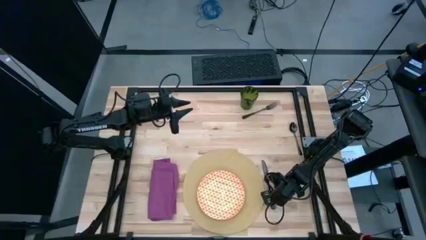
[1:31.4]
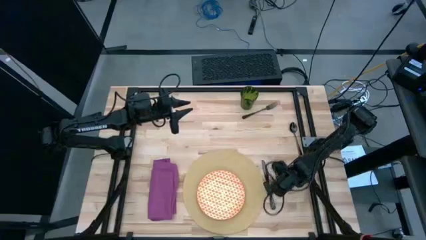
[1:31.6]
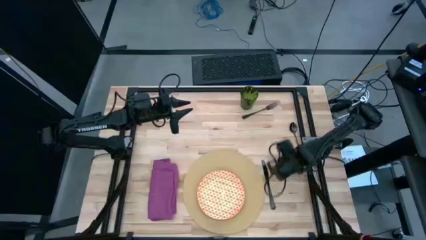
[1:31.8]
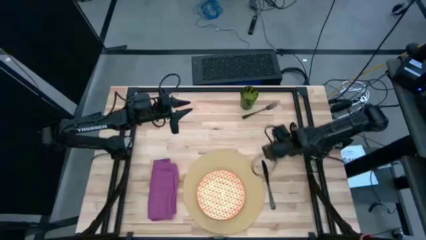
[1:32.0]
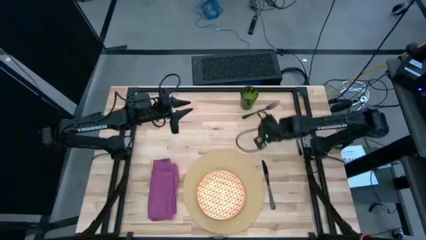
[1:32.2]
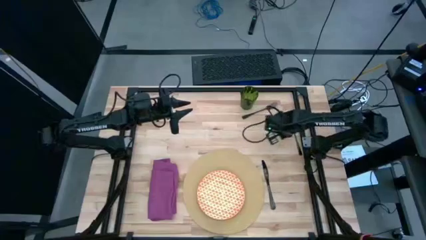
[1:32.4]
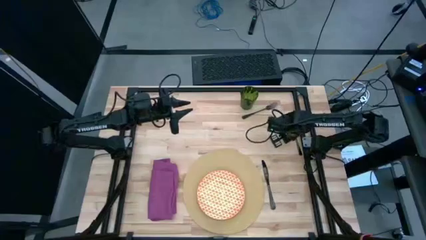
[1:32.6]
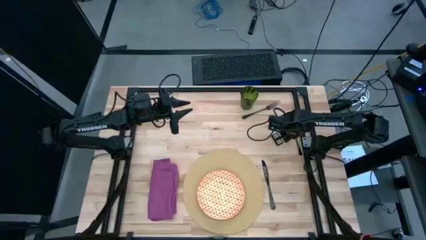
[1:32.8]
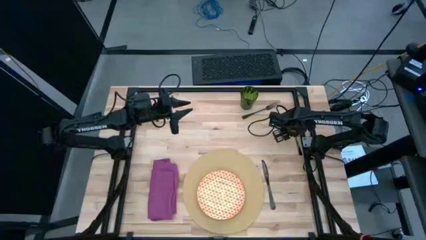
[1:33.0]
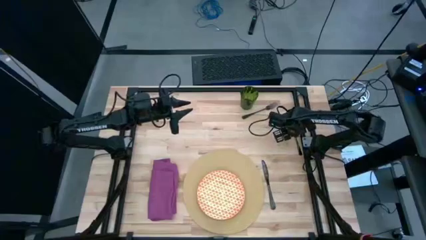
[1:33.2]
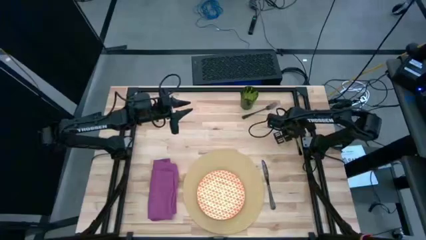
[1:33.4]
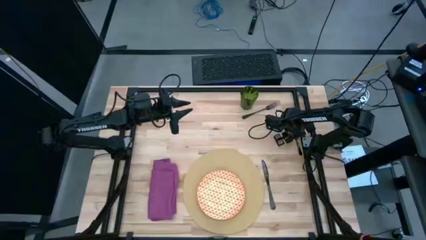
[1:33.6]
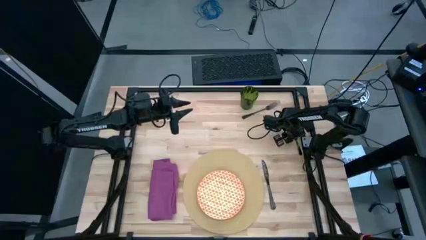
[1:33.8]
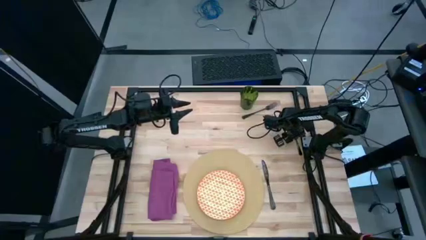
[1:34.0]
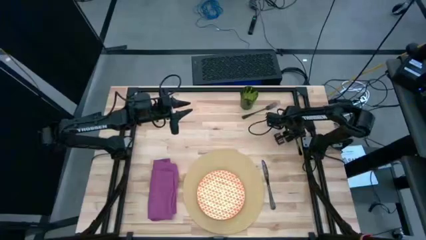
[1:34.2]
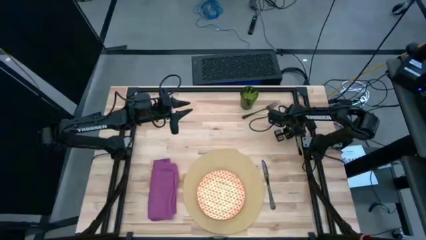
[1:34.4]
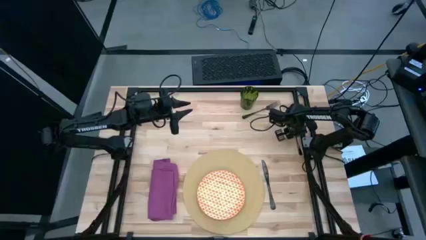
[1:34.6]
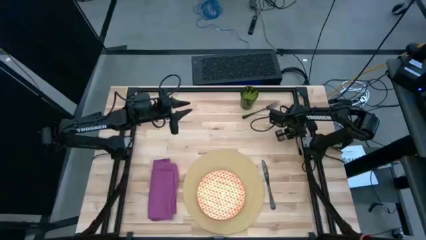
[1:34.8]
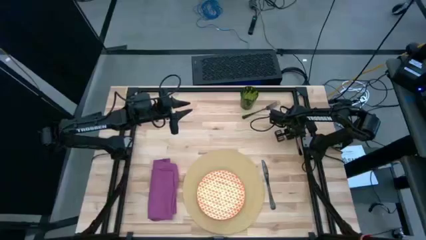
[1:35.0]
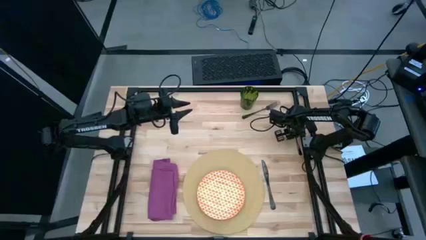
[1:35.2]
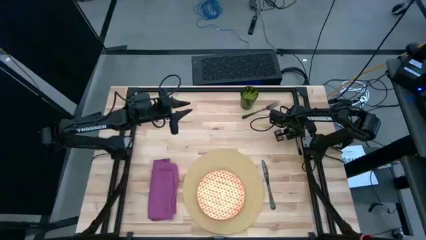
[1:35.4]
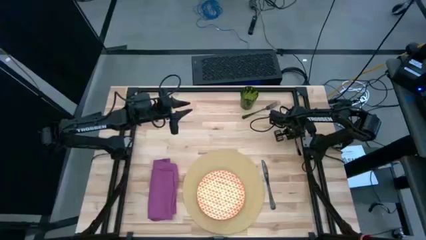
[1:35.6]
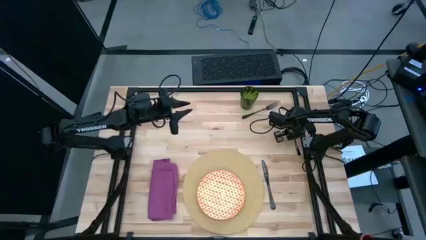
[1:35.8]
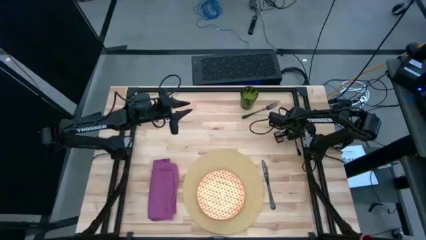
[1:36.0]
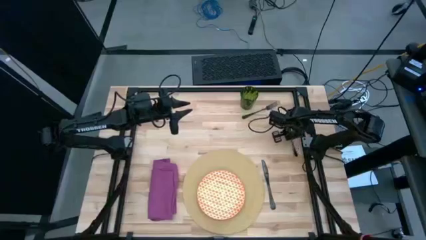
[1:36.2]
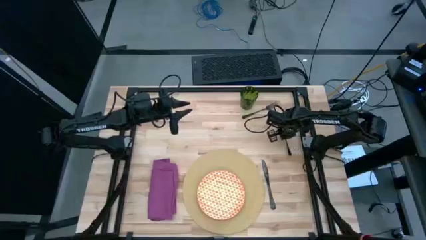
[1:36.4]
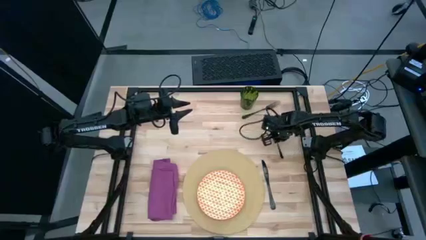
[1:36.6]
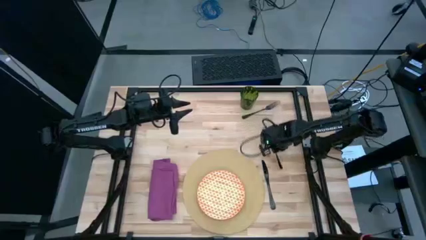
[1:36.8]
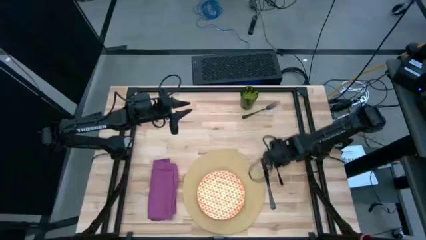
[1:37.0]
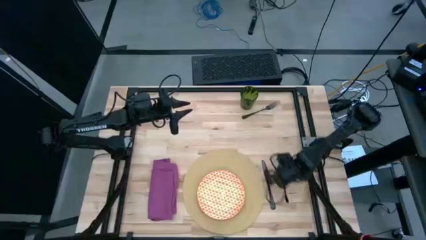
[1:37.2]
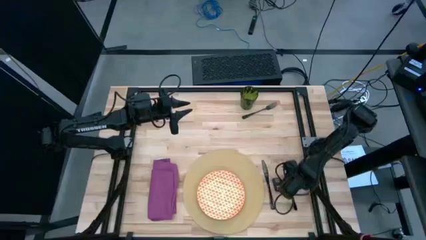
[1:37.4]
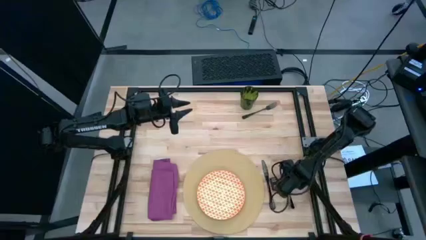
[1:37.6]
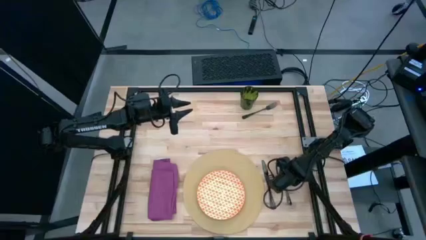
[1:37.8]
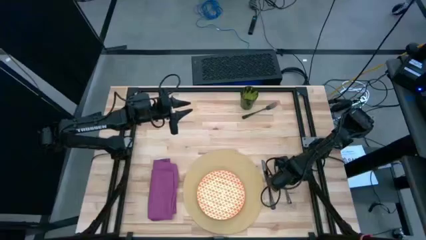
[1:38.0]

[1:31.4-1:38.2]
Task: Set table place
Move the black spoon to the right of the table knife

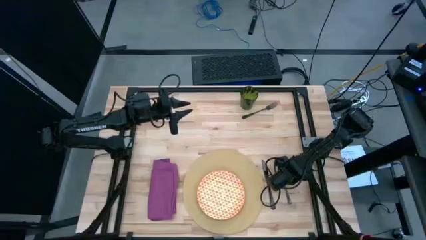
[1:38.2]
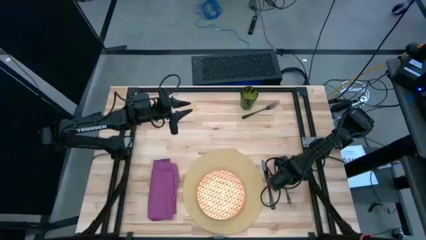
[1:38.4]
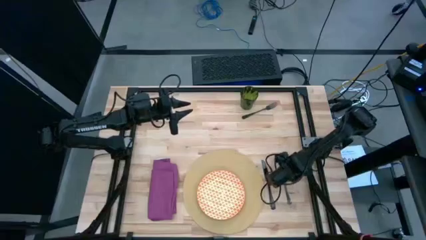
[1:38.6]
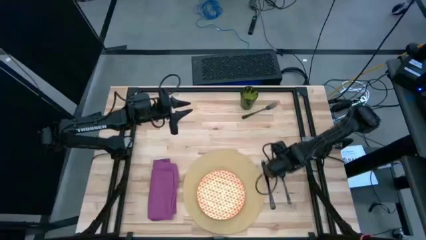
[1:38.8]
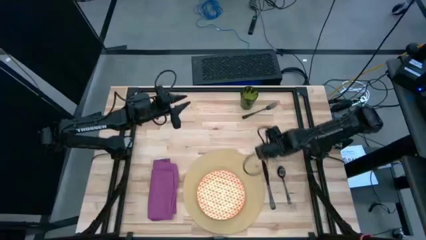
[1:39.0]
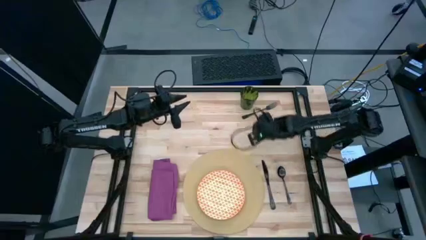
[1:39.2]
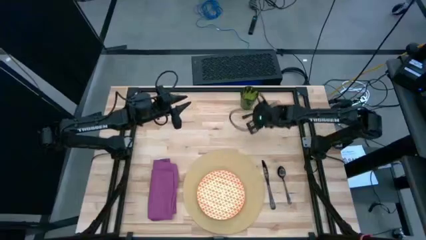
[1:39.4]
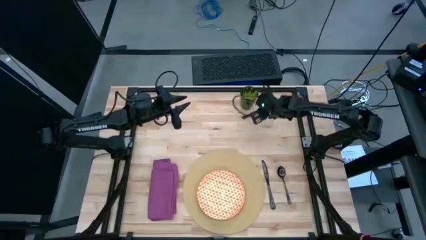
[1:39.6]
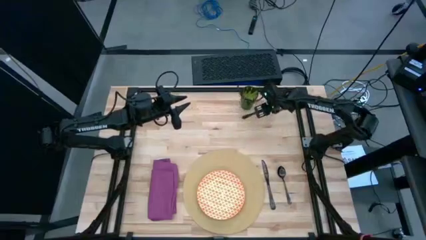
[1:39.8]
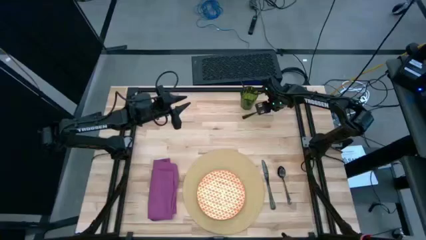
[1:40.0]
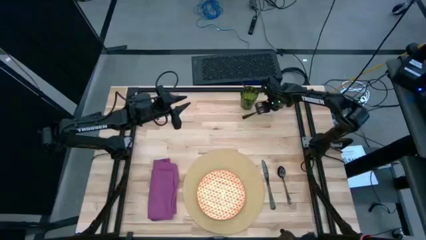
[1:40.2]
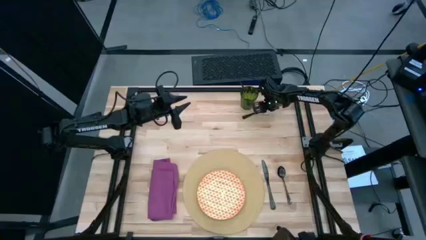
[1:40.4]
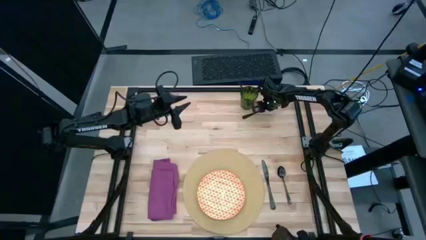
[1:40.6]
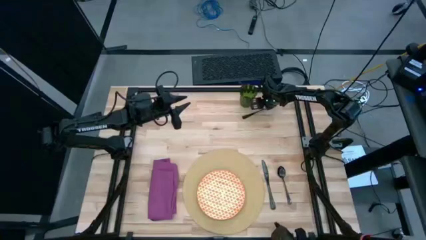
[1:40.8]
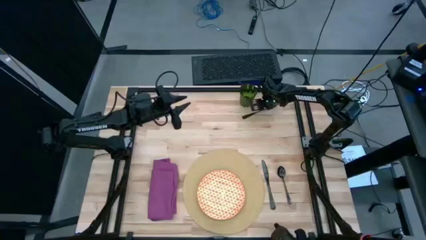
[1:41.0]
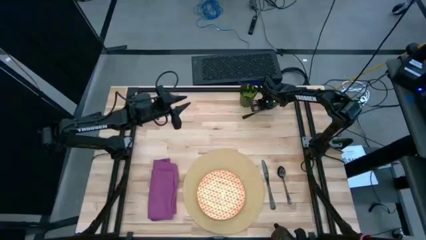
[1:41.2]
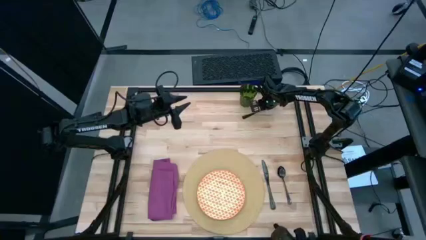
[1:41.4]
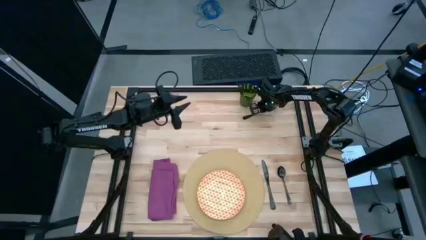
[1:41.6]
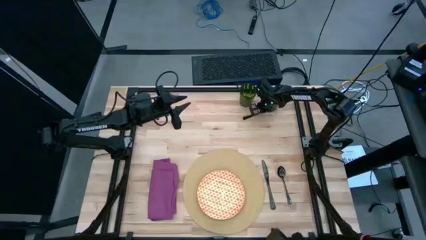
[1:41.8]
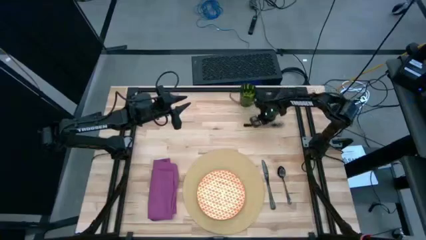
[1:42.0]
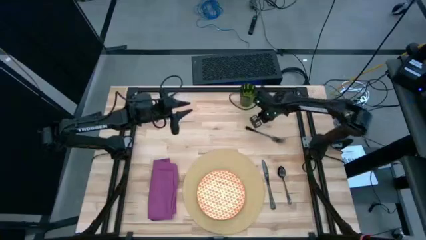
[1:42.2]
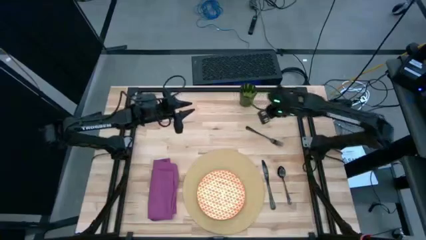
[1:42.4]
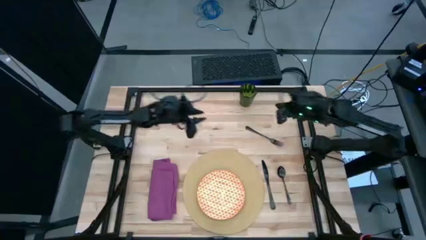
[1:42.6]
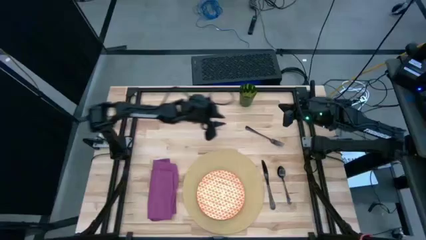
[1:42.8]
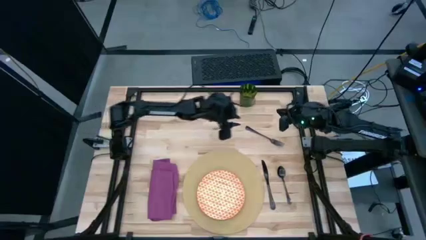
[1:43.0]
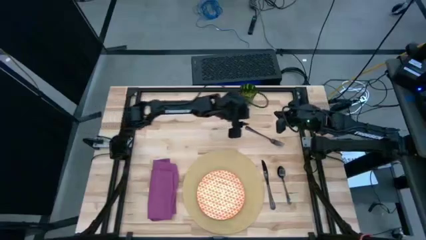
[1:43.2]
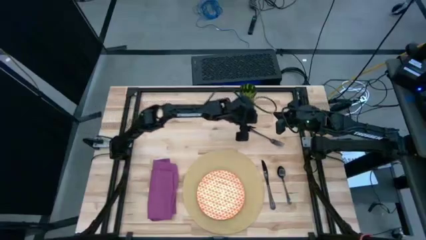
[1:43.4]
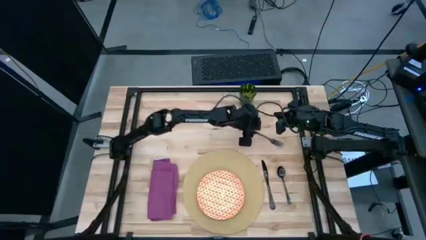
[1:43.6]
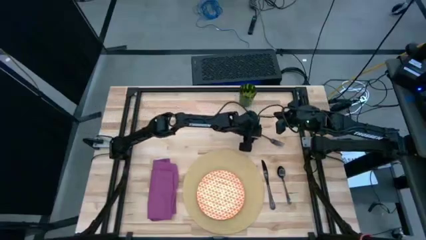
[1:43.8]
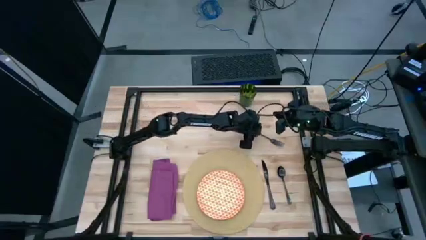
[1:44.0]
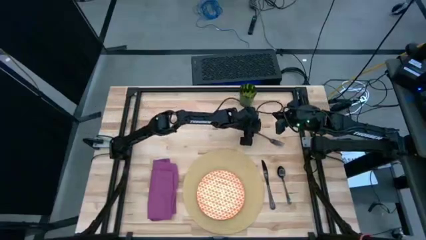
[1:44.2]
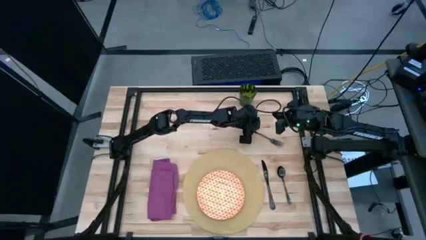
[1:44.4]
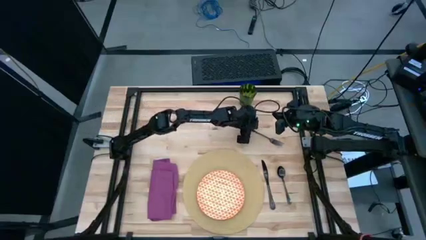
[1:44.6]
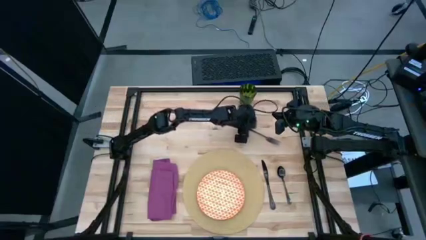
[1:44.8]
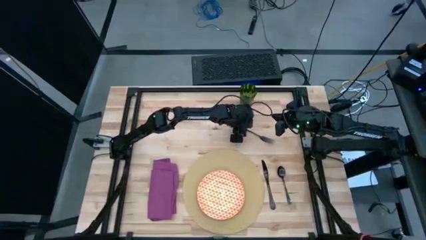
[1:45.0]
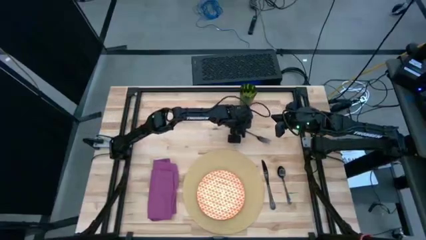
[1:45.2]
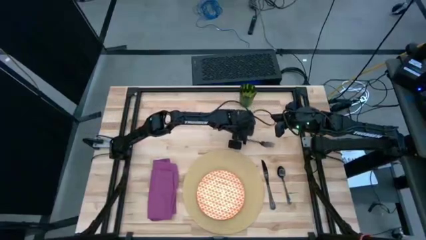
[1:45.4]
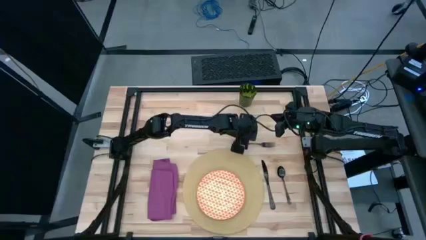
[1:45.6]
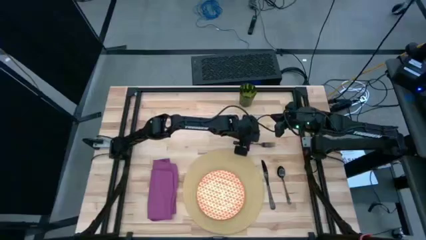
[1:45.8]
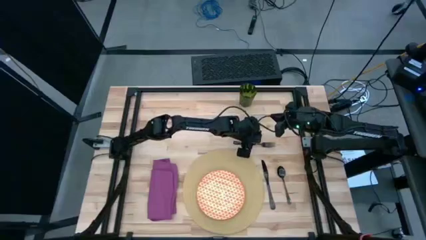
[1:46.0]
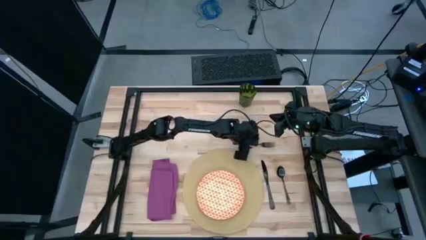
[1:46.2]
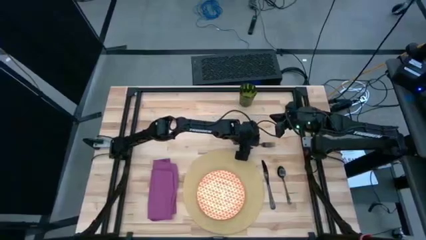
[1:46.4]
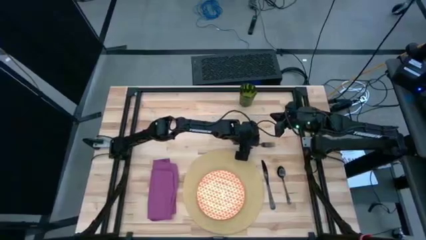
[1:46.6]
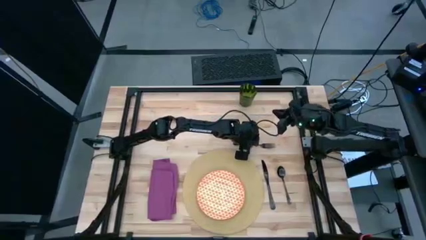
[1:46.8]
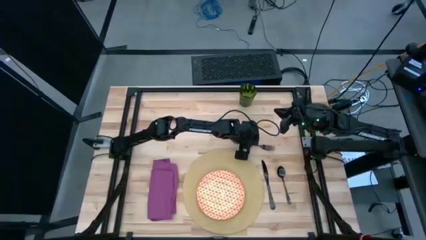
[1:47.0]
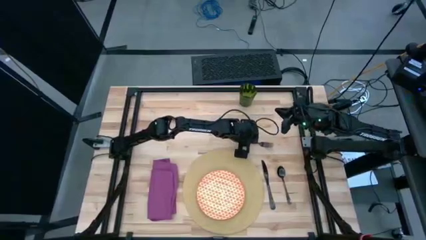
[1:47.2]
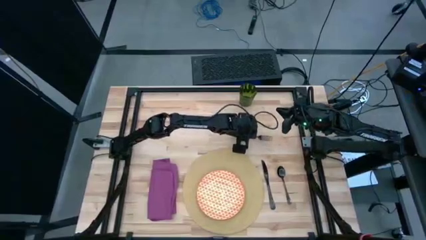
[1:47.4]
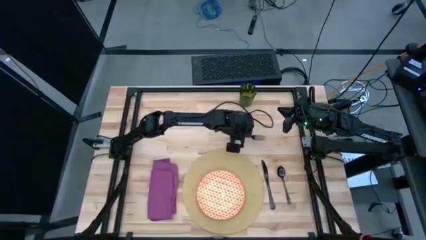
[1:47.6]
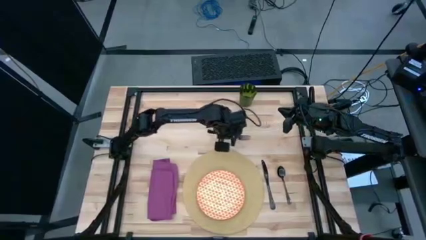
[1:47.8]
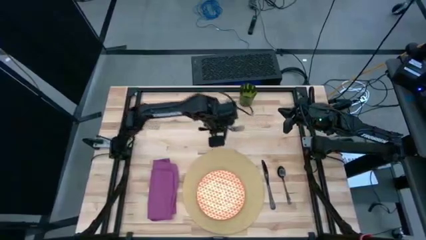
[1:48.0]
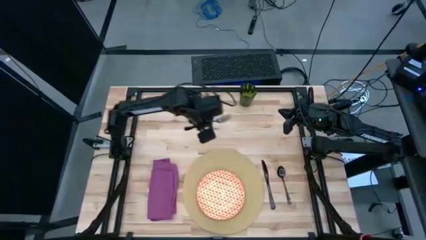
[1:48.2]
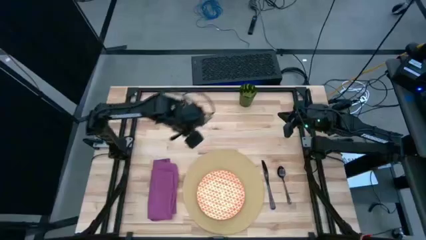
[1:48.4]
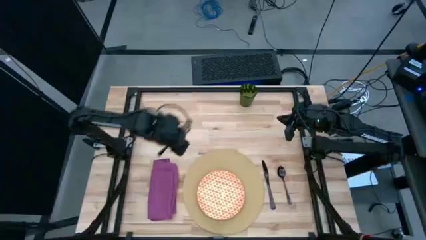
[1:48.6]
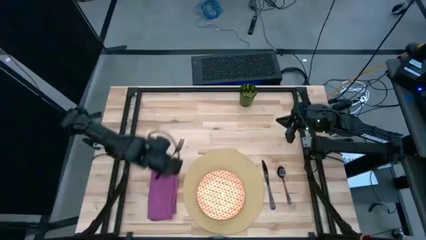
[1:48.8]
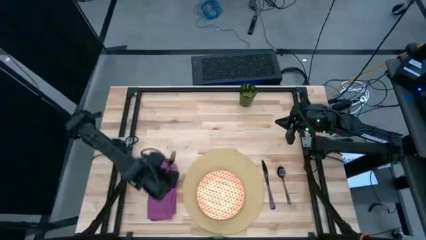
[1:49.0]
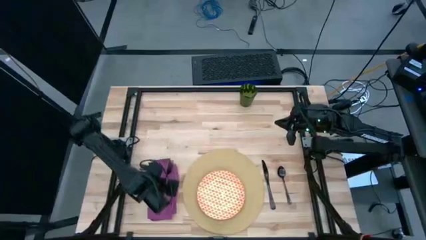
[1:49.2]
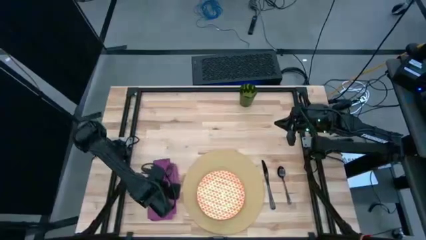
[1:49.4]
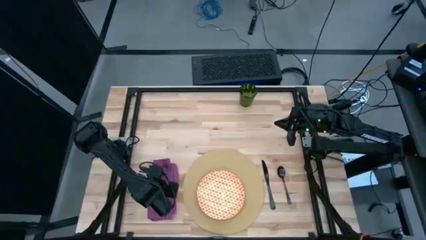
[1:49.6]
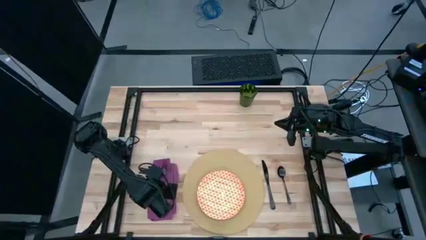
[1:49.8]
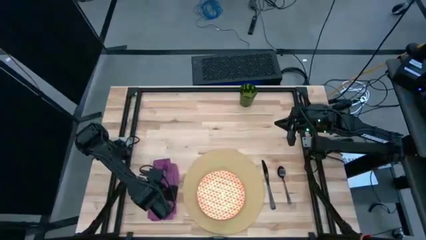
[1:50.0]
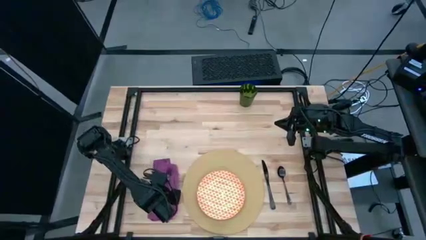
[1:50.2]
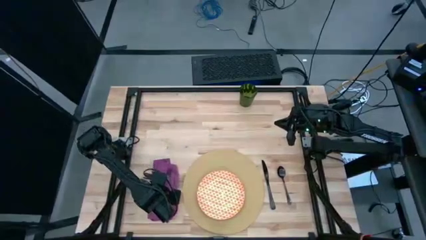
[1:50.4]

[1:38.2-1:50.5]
Put the black fork on top of the purple table napkin
